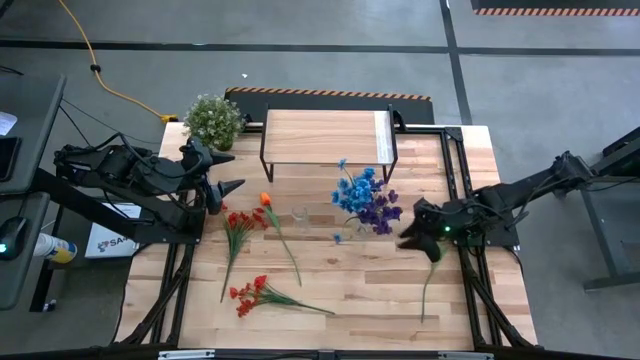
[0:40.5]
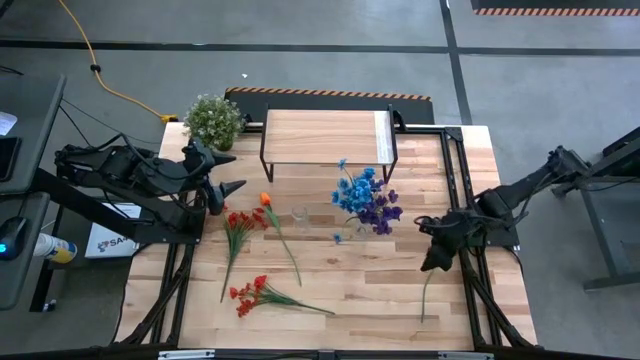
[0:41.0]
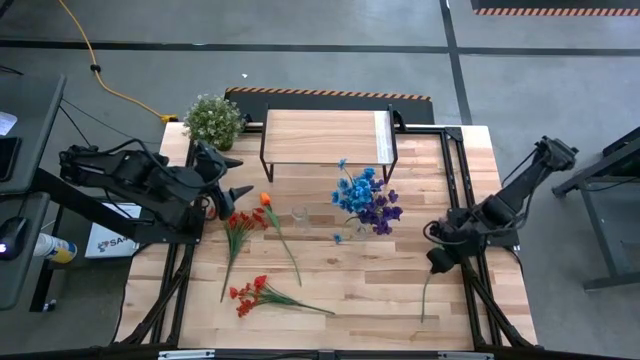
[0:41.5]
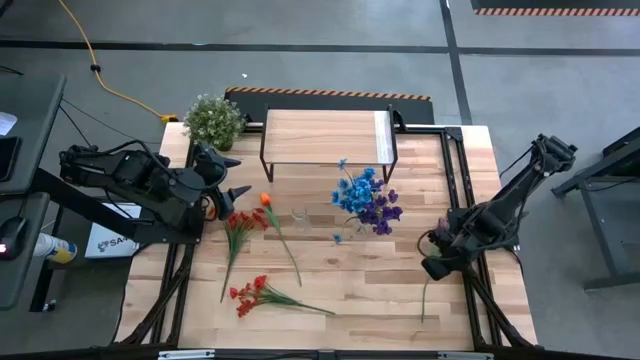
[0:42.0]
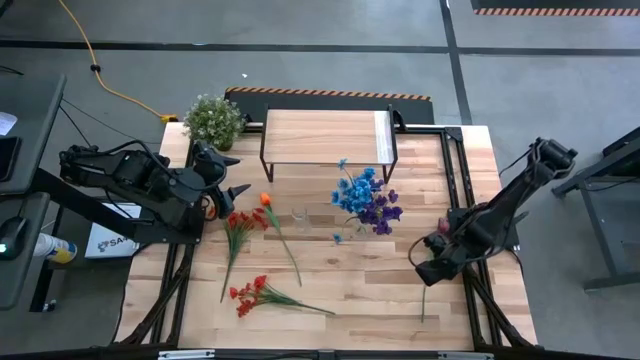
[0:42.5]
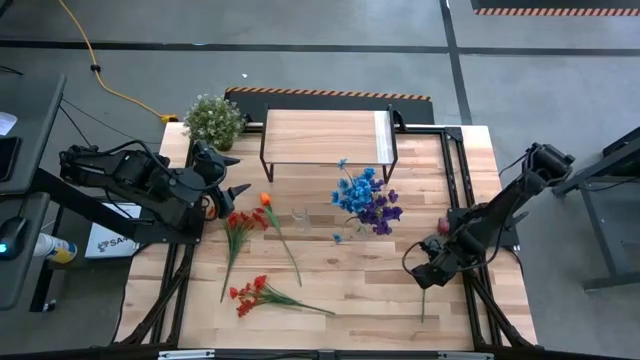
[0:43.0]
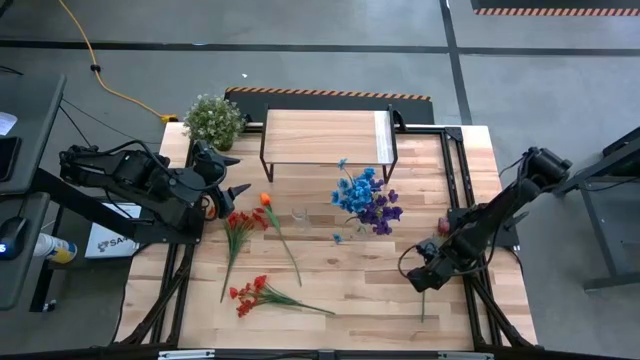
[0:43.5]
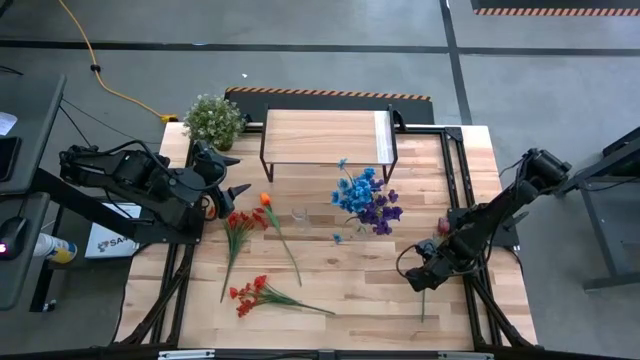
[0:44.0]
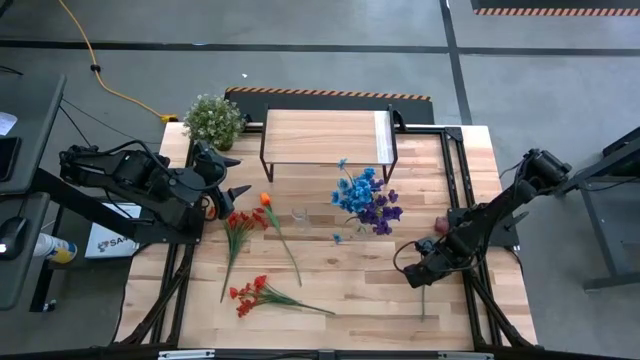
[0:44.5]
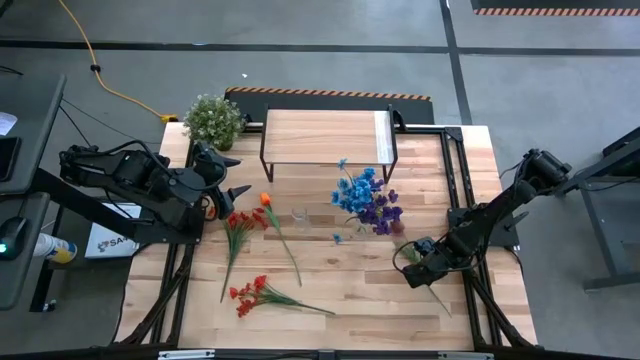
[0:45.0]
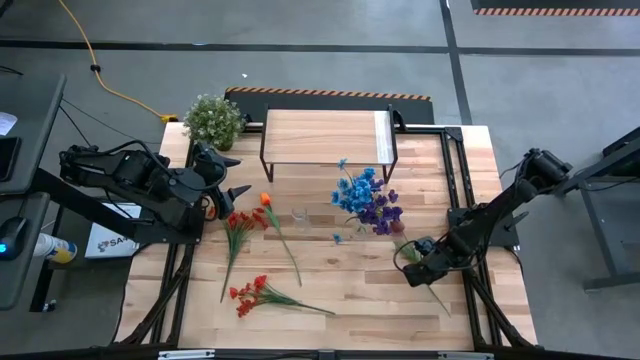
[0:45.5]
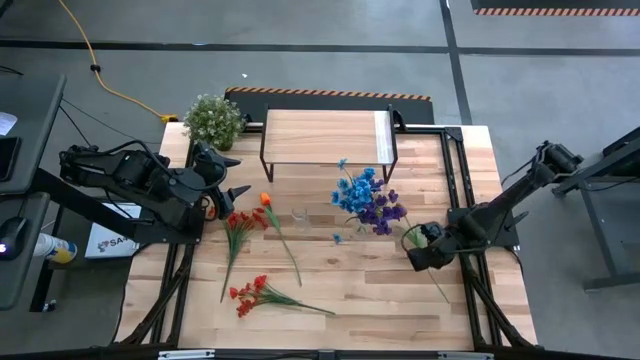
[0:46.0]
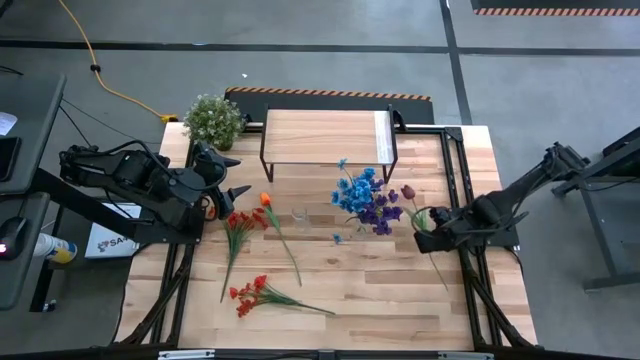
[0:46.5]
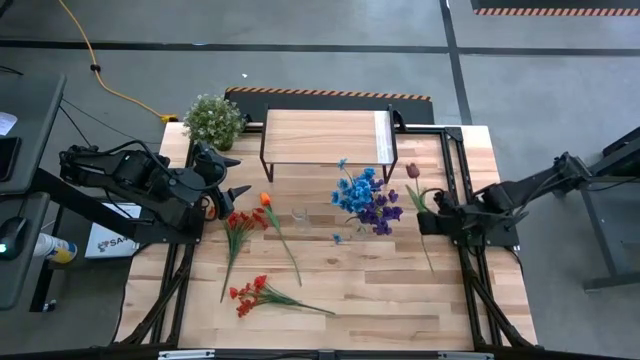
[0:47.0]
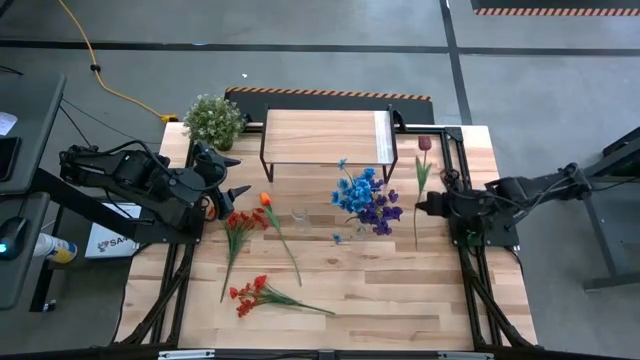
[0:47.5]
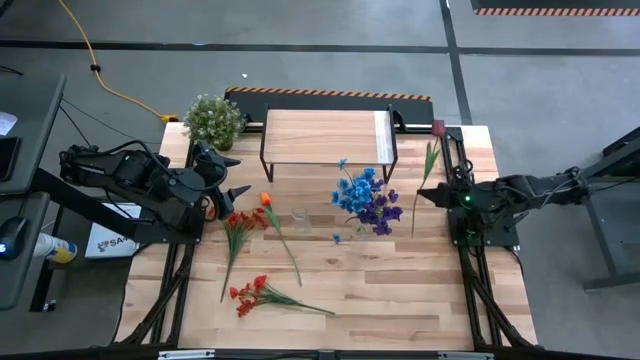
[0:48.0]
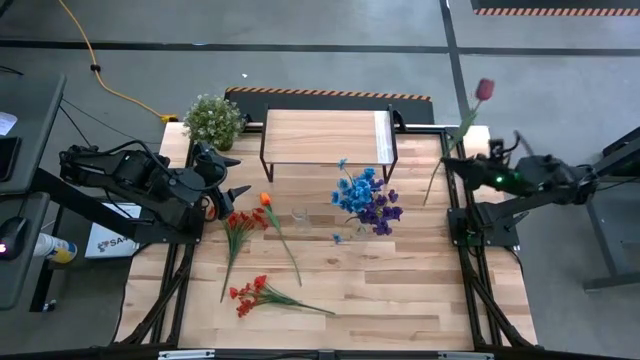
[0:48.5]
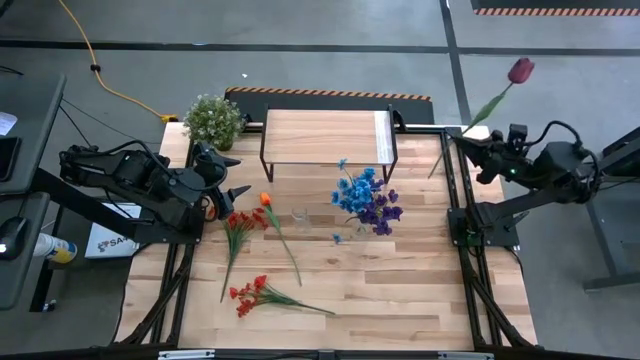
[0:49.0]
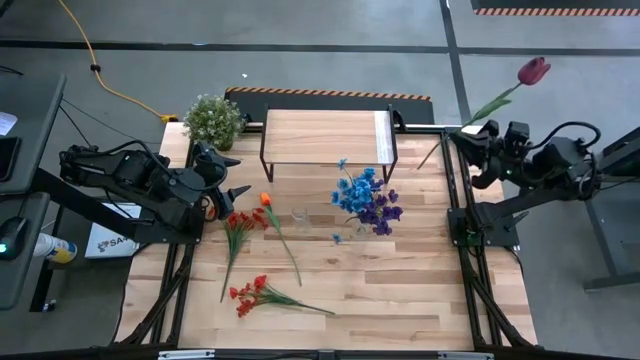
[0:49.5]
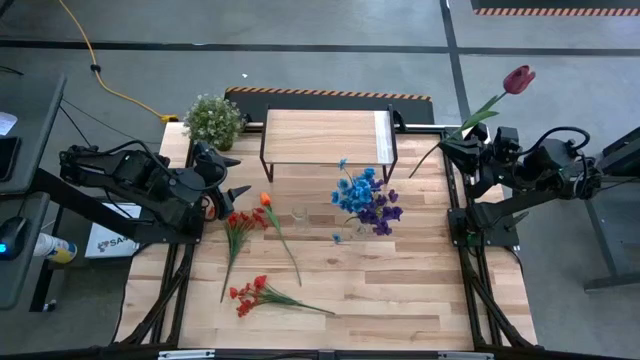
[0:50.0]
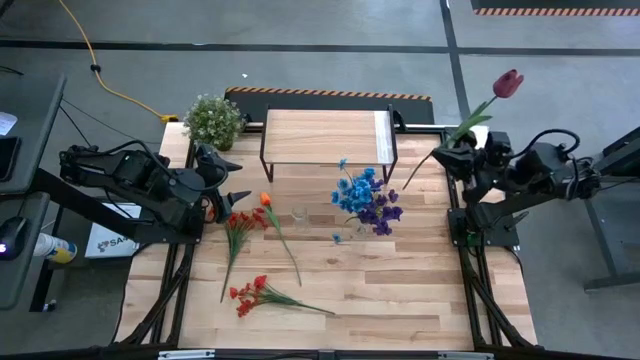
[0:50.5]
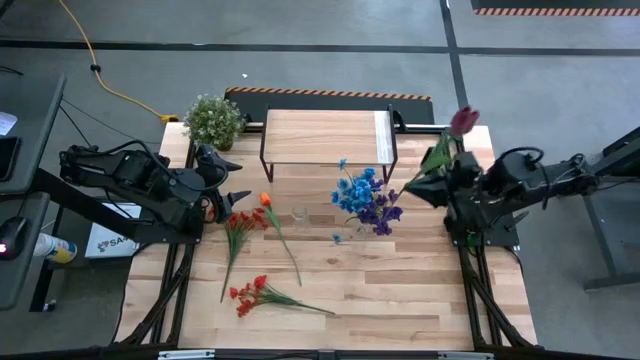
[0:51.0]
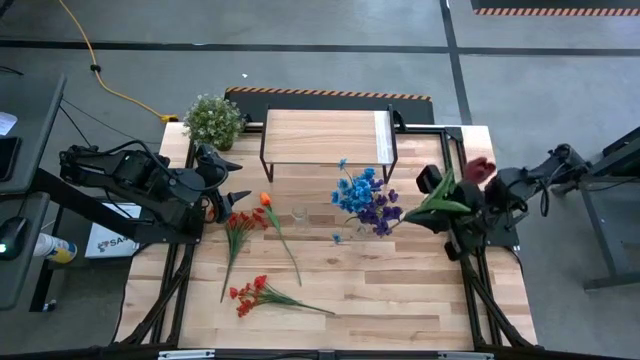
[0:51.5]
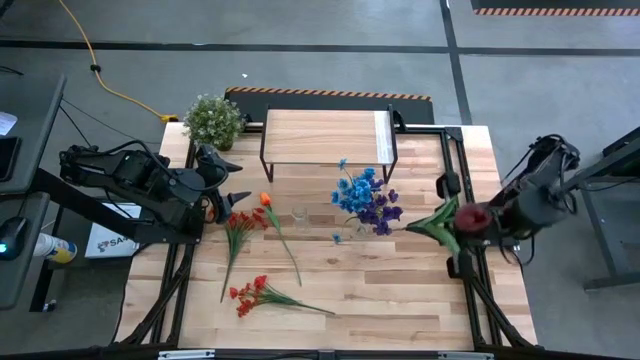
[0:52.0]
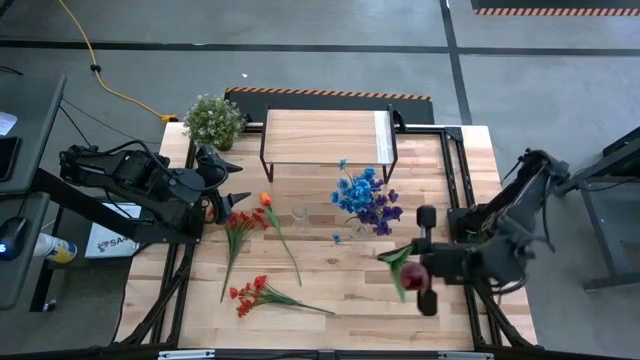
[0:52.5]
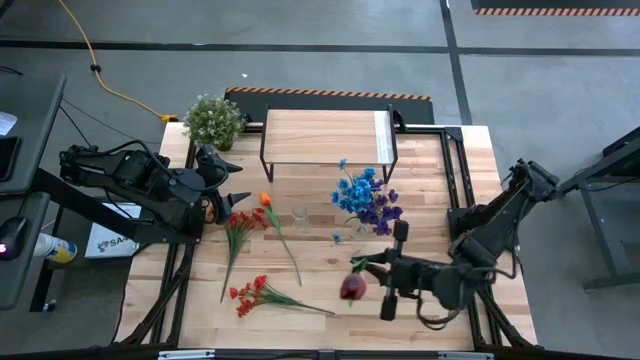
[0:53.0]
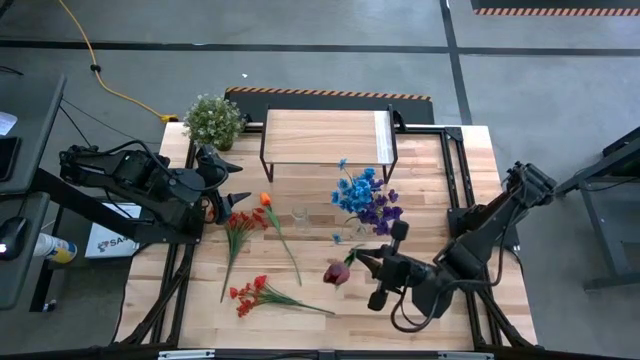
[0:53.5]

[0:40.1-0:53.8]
Task: Pick and place flowers into a vace then onto a shelf
Put the purple flower into the right transparent vase

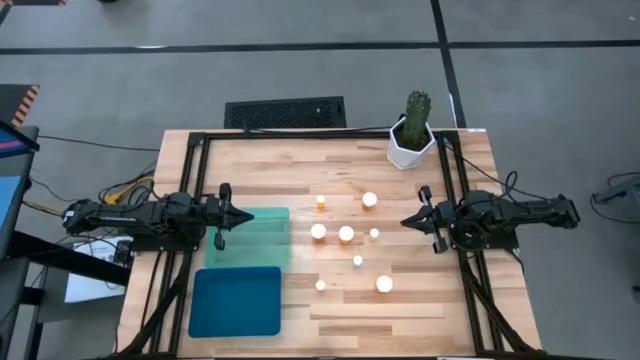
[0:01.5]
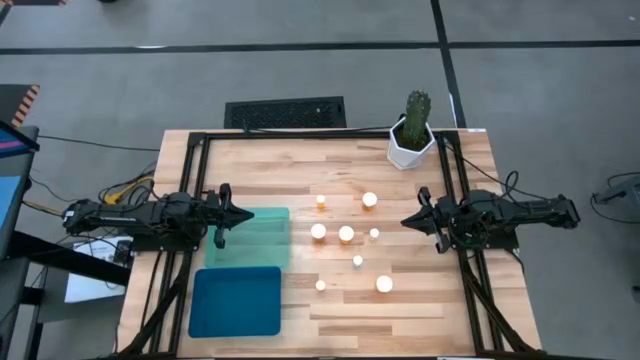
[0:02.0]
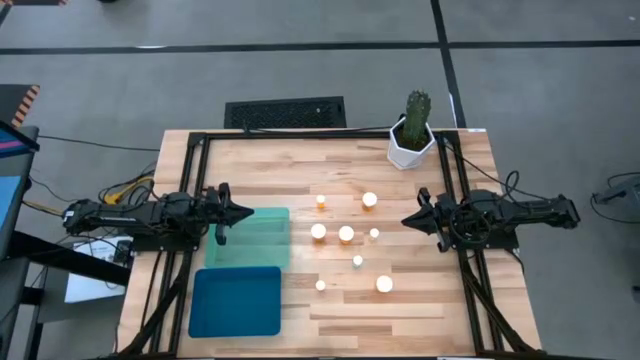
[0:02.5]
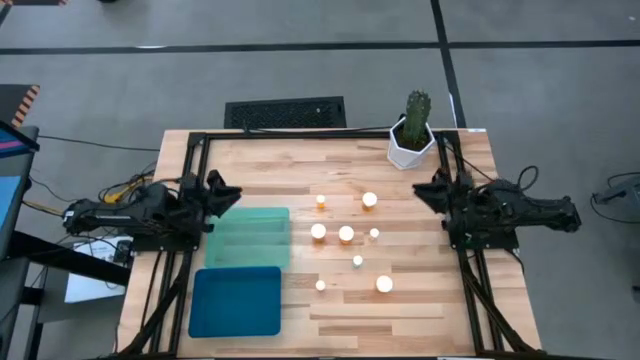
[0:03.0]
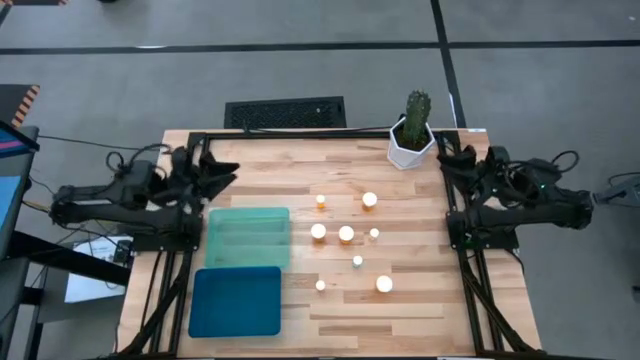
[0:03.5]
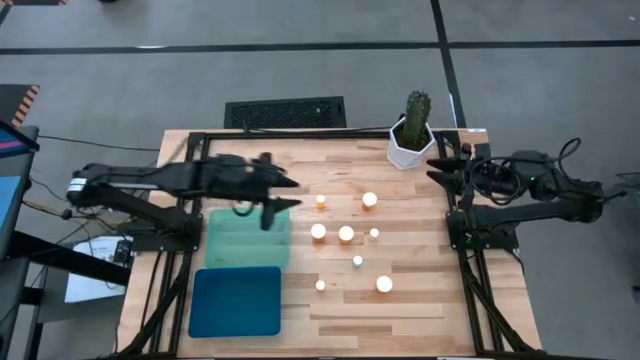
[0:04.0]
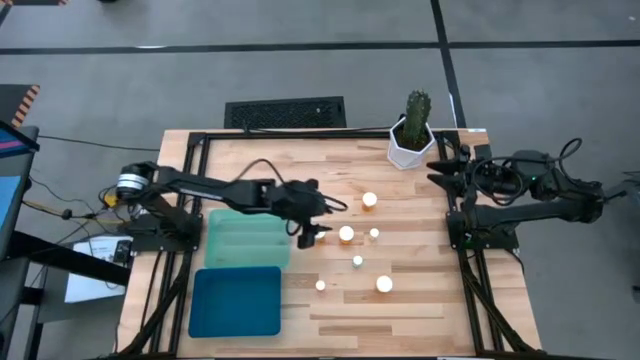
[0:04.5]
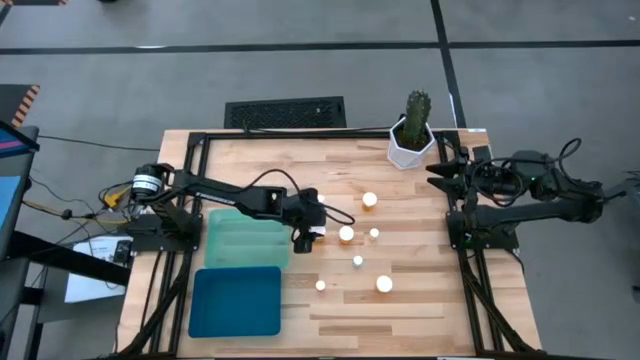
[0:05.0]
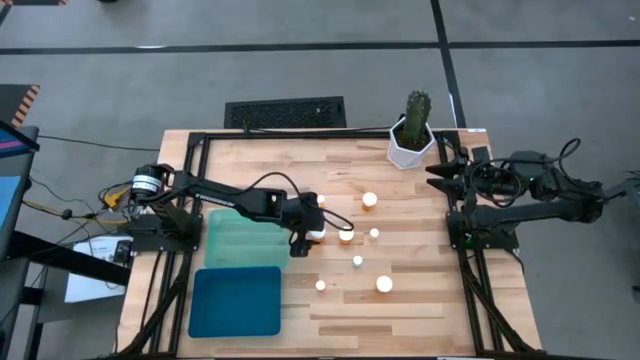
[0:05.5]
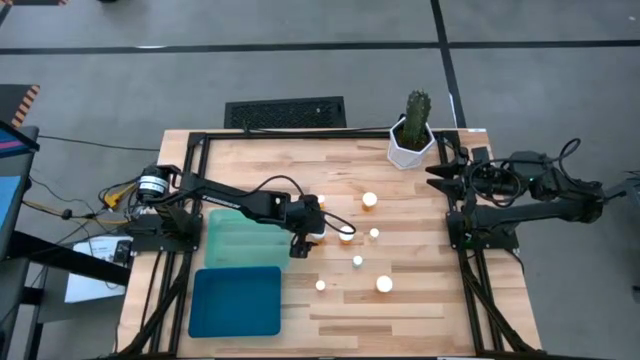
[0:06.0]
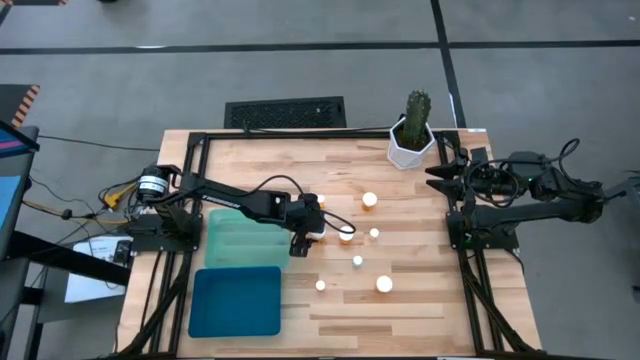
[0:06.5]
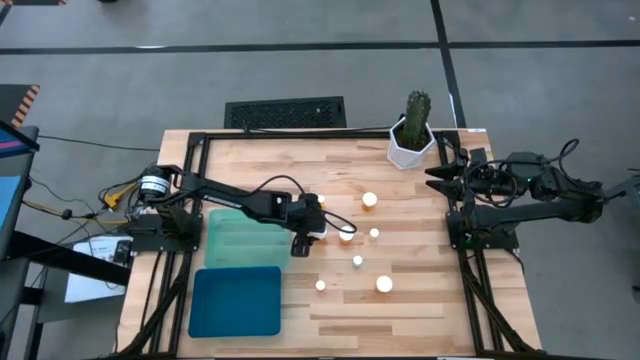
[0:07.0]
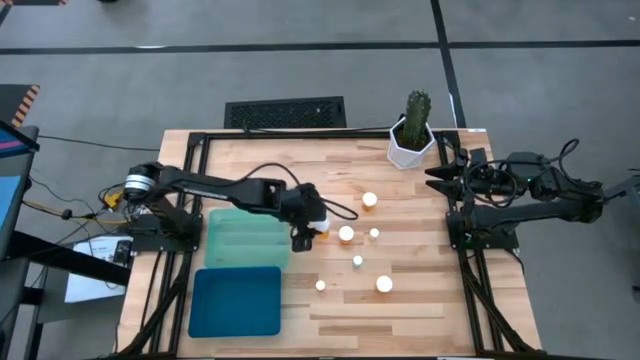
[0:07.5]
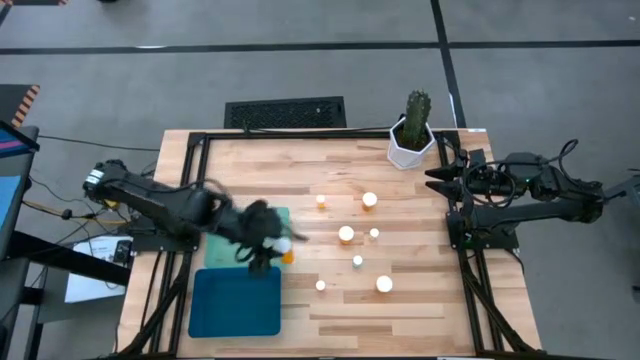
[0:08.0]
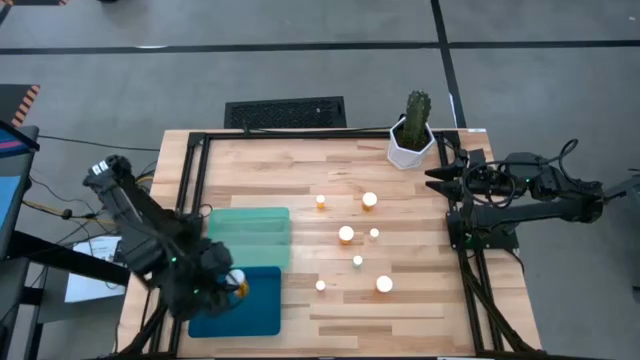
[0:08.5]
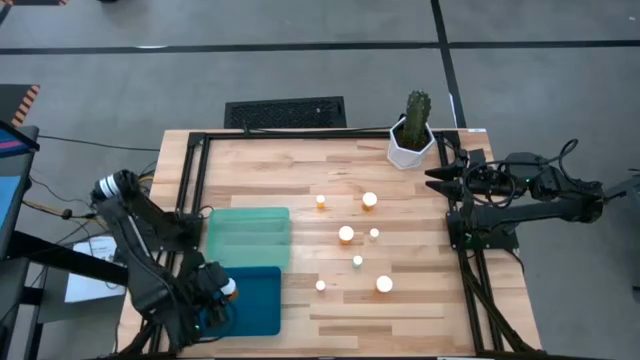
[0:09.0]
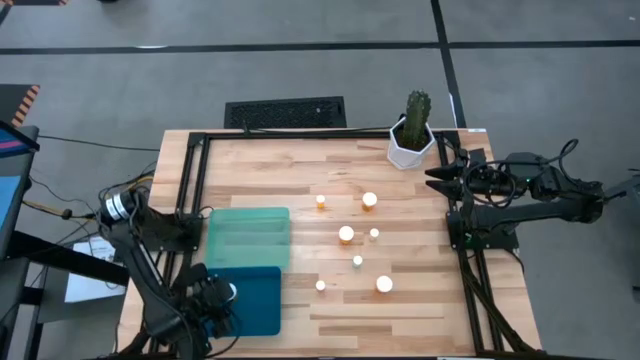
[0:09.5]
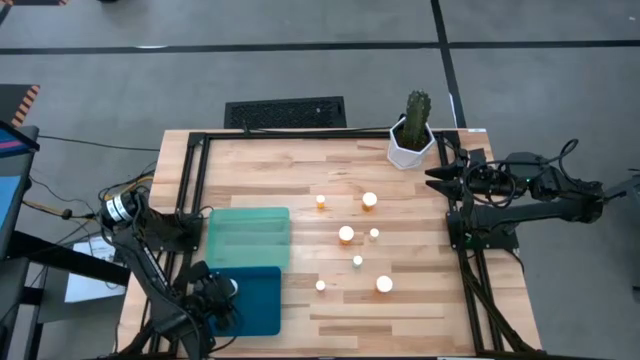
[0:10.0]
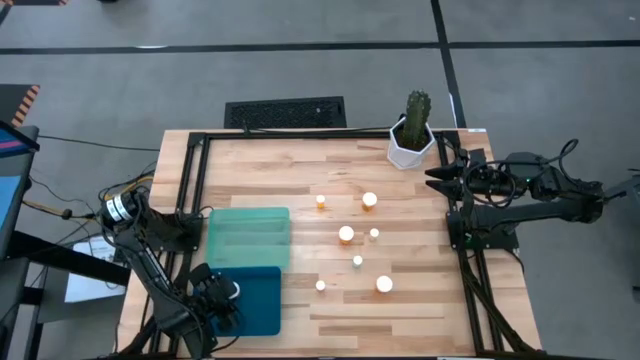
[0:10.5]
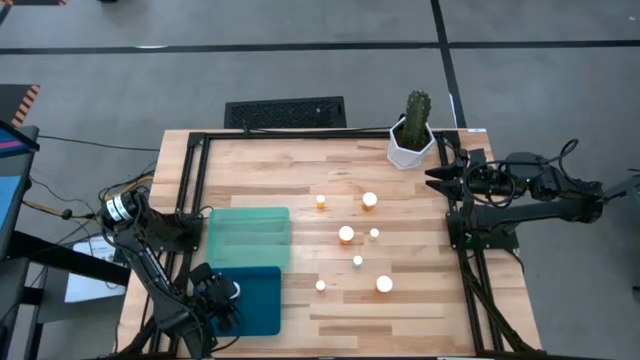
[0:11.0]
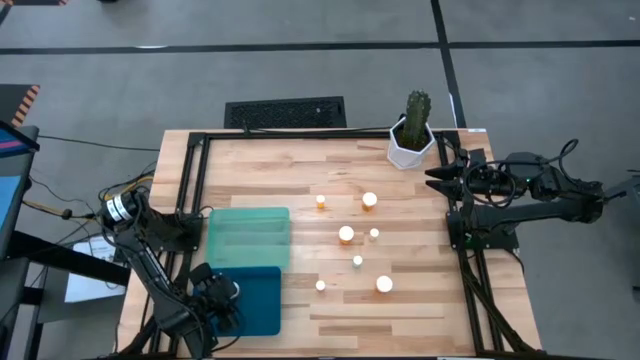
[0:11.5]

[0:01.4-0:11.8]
Task: Pick and place medicine bottles into bin by pill shape (circle, oval)
Put the middle left big orange pill bottle into the blue bin
